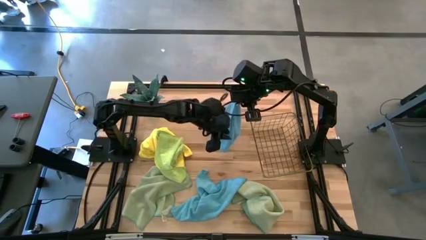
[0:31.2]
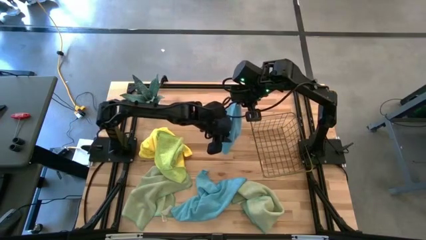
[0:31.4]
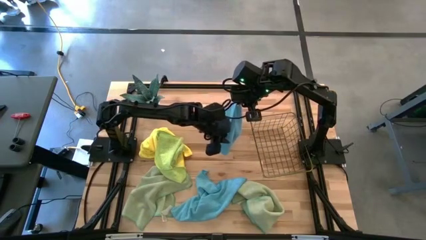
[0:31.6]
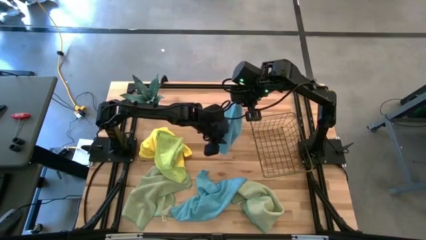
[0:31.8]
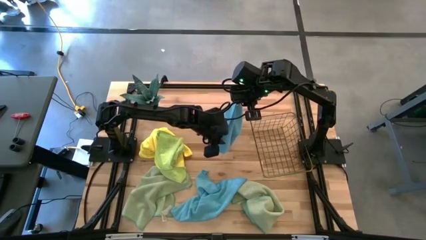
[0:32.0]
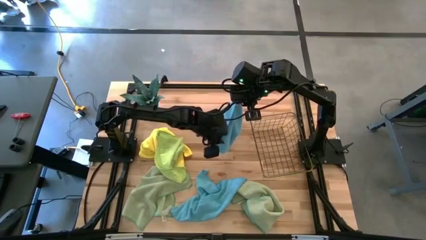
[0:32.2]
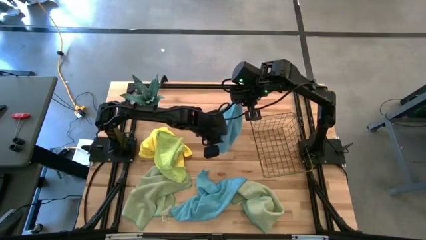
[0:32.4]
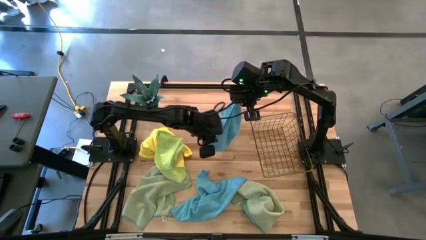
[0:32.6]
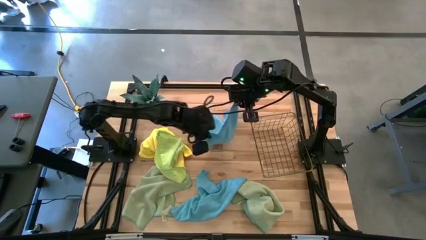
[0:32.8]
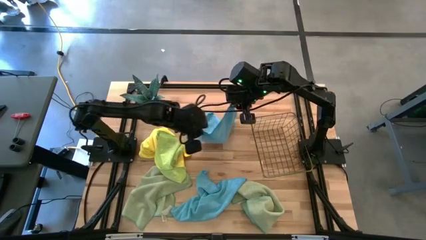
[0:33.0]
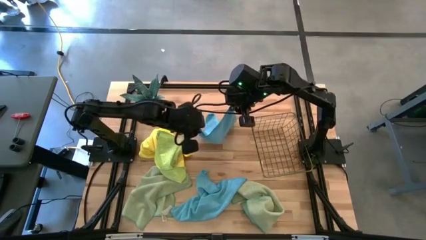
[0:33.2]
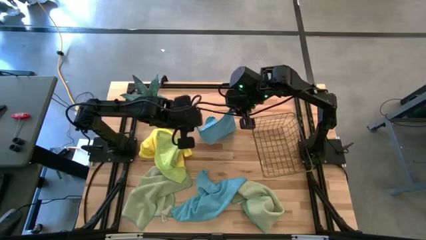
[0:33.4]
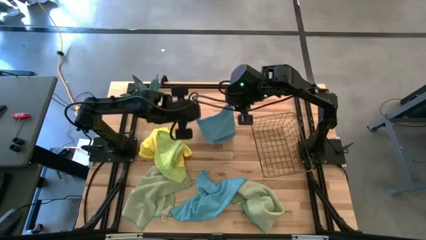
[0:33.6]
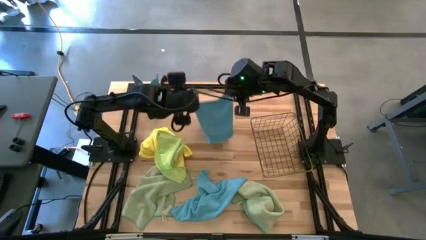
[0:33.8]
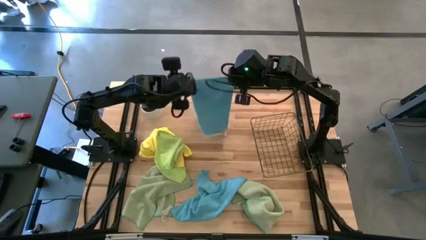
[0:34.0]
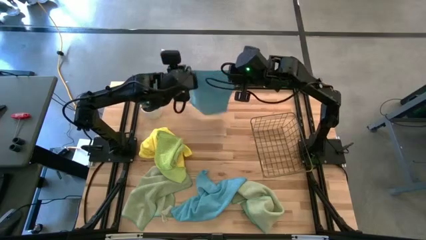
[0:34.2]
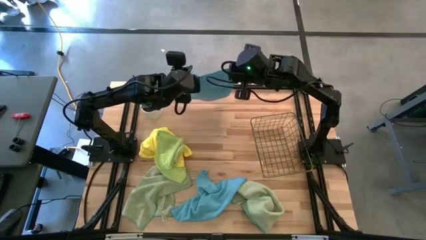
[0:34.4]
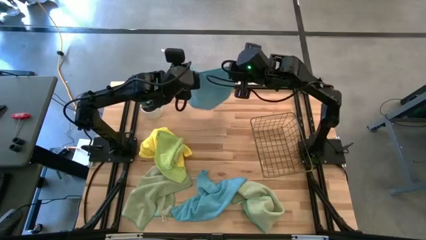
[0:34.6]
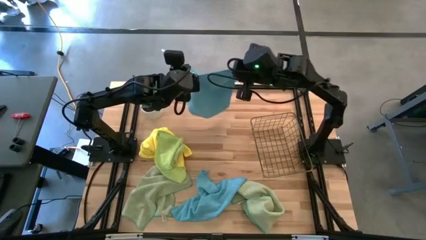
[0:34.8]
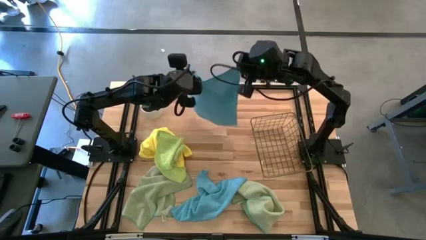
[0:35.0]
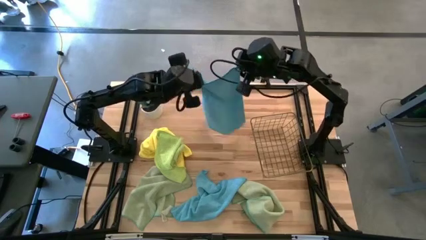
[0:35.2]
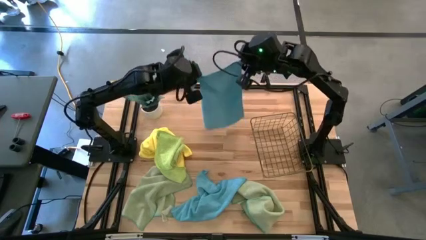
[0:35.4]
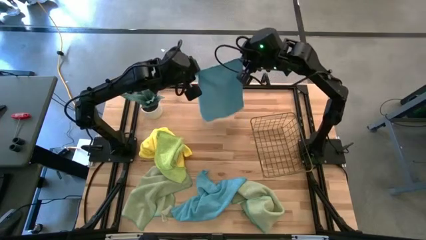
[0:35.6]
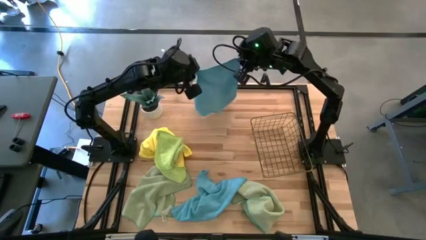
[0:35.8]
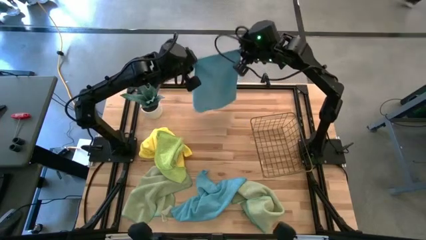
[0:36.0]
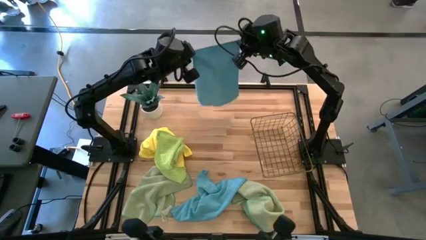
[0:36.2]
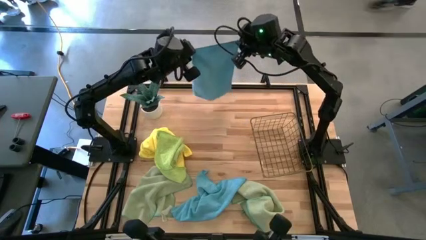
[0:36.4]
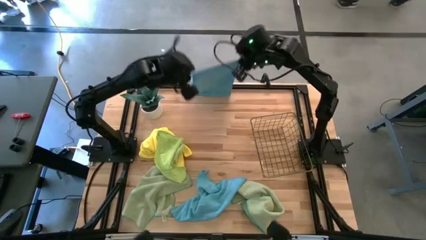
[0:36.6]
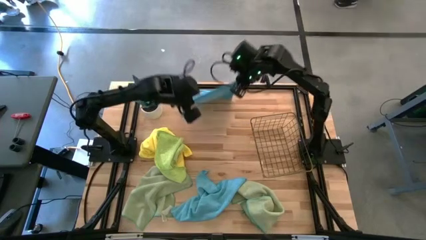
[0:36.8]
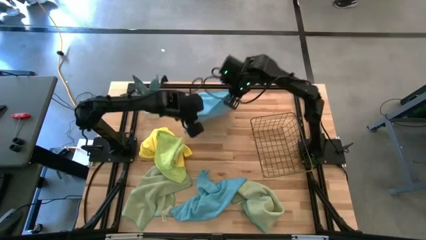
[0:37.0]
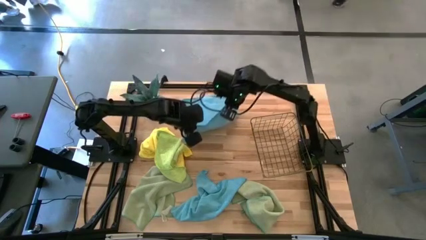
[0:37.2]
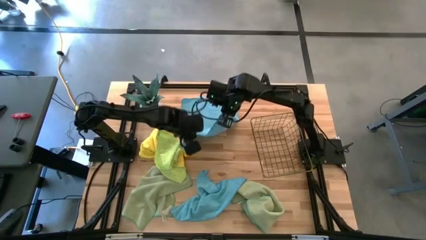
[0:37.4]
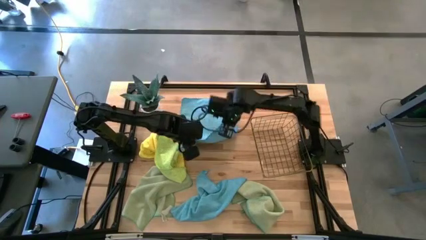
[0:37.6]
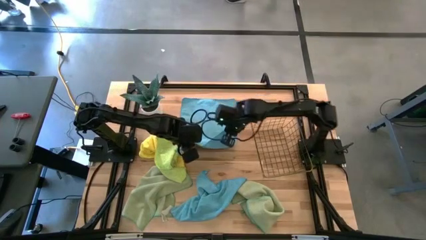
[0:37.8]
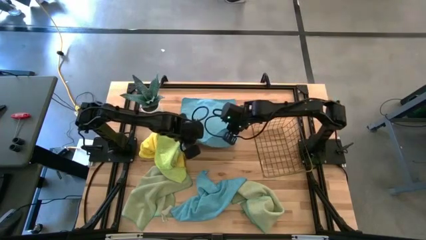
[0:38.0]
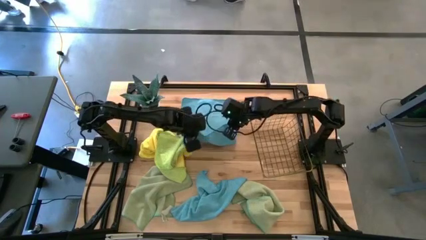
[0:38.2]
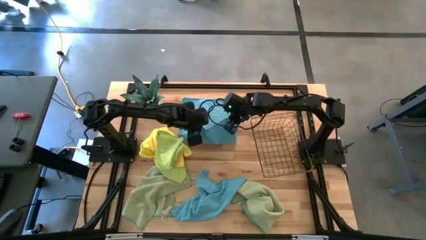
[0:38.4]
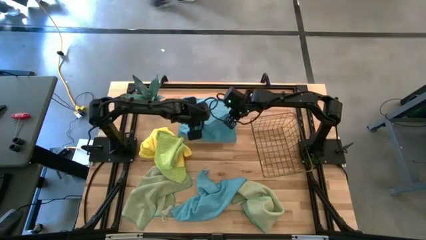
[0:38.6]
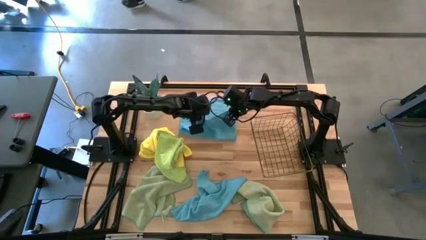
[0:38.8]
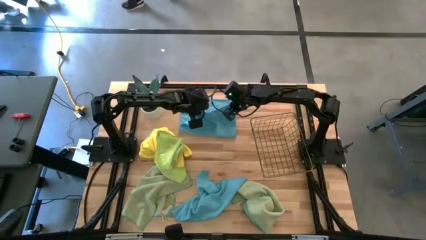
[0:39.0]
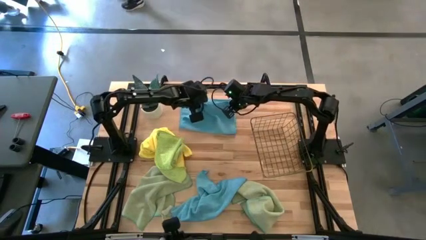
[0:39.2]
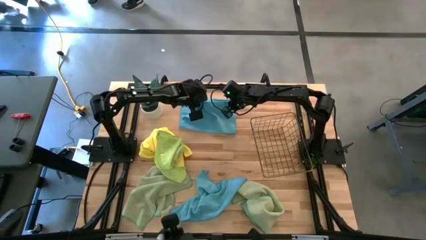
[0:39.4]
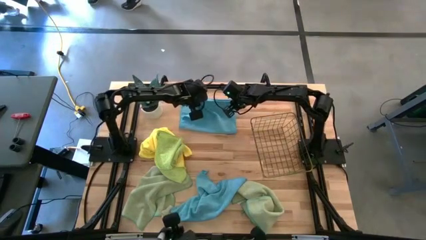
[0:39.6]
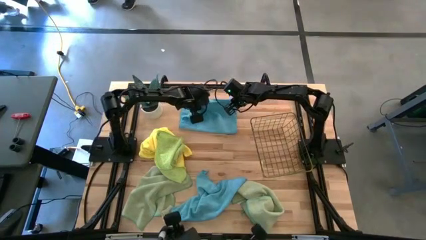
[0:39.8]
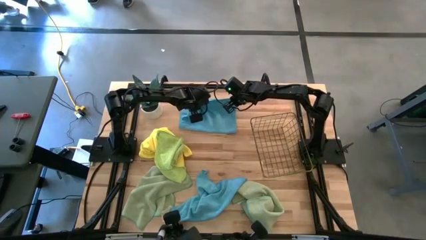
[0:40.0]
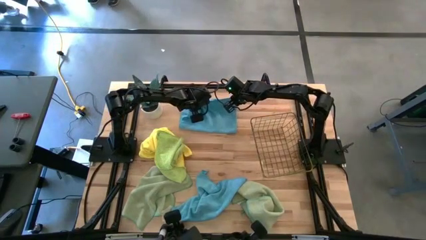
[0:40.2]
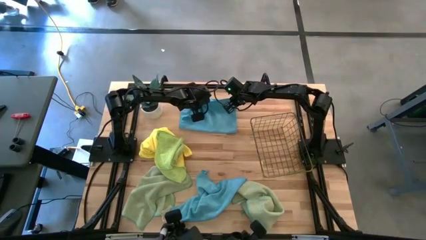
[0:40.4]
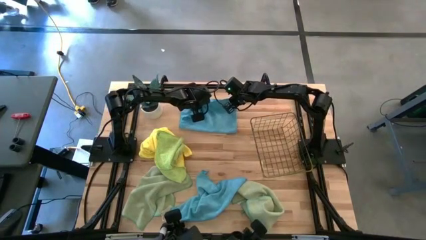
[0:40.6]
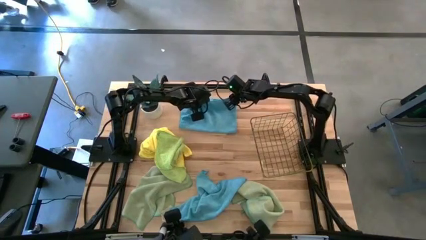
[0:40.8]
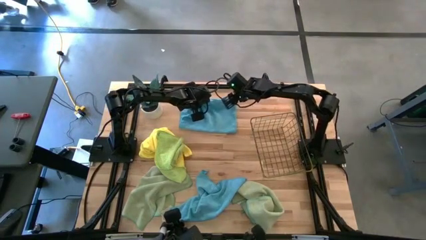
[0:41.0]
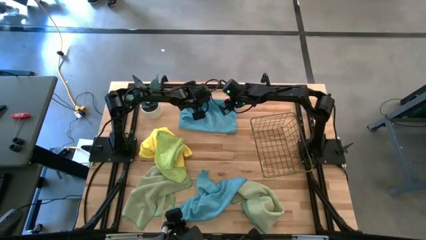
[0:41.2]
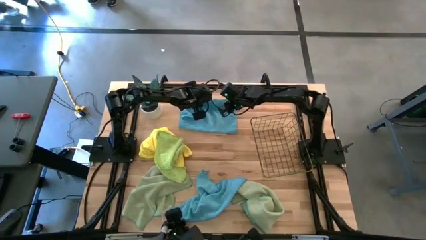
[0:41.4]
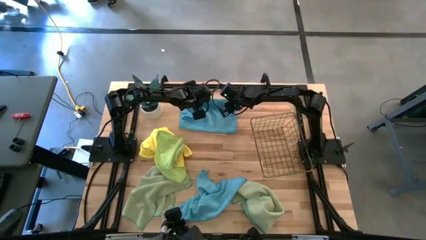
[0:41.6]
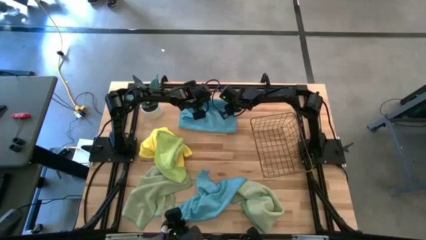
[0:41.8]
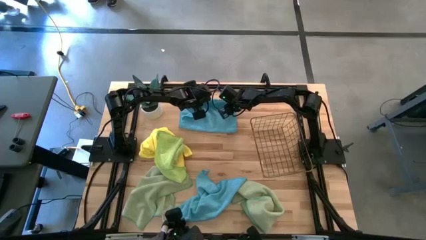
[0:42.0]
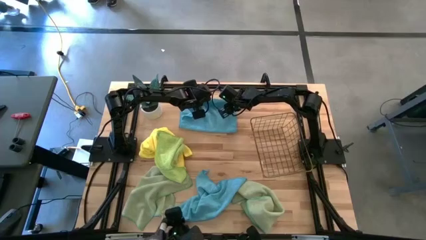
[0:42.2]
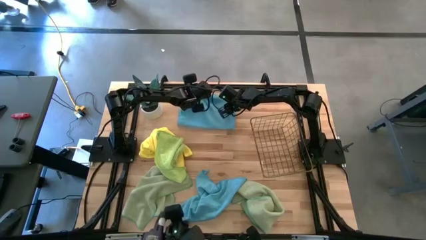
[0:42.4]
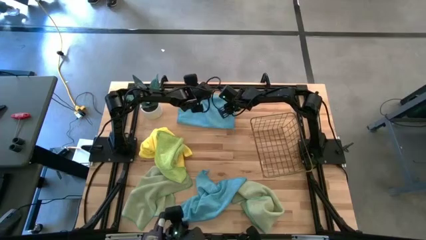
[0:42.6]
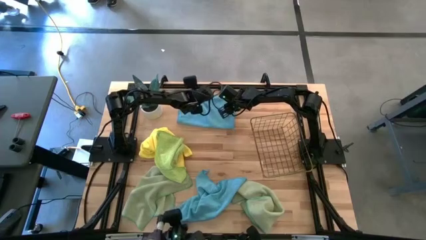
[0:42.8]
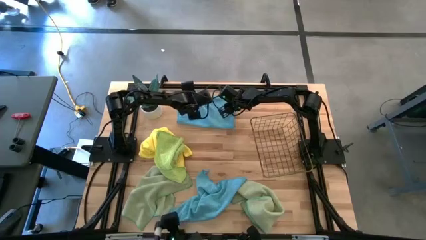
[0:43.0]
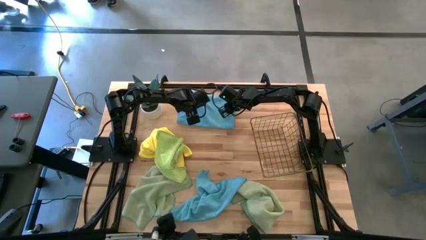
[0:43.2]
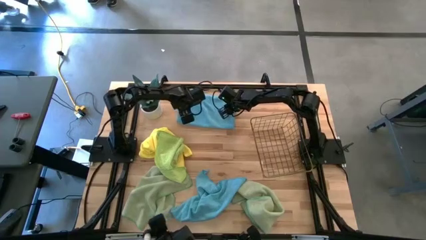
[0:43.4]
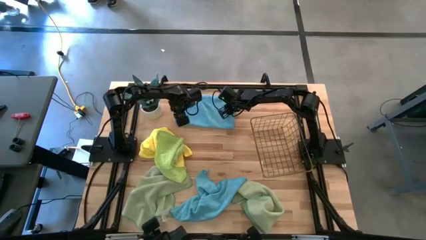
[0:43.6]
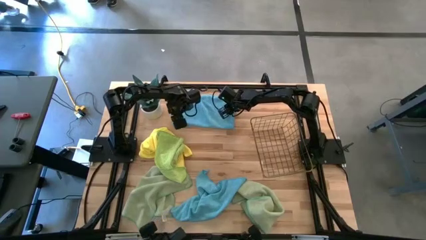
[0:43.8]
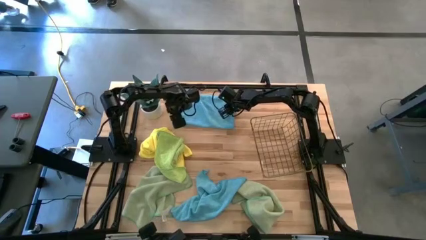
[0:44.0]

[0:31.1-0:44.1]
Task: Fold microfiber towels
Fold the top blue microfiber cloth
